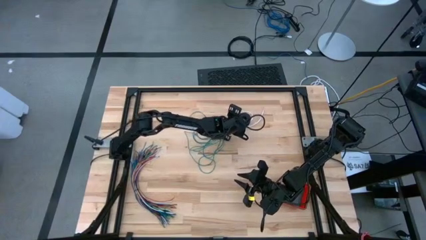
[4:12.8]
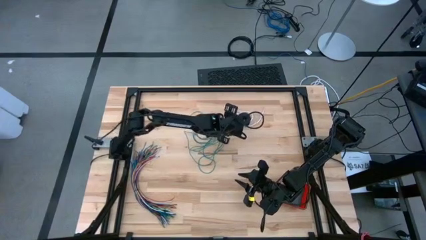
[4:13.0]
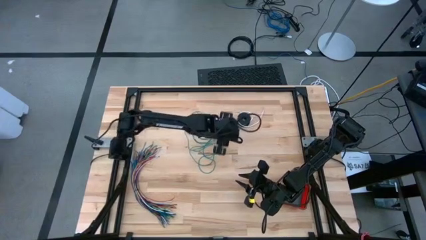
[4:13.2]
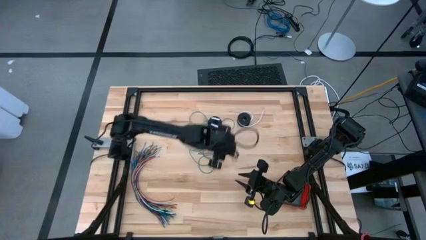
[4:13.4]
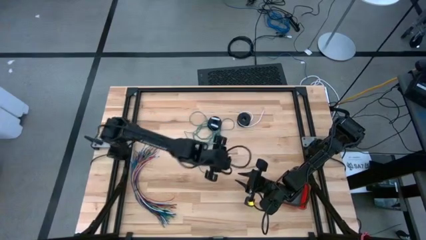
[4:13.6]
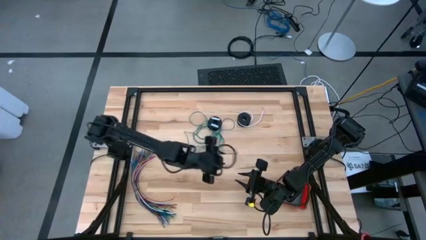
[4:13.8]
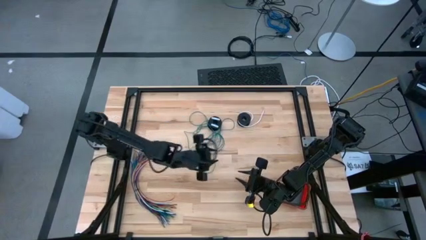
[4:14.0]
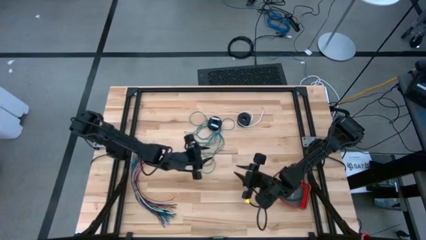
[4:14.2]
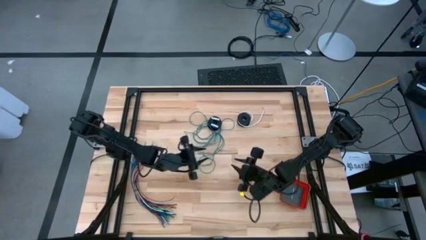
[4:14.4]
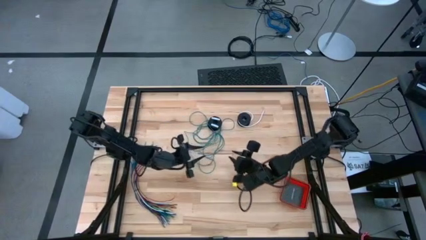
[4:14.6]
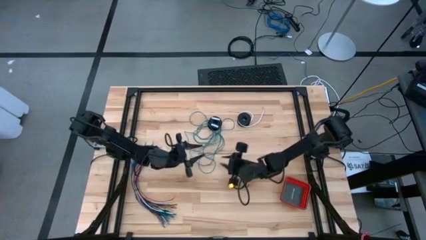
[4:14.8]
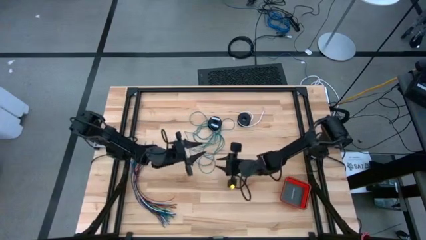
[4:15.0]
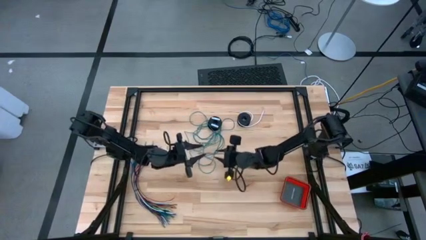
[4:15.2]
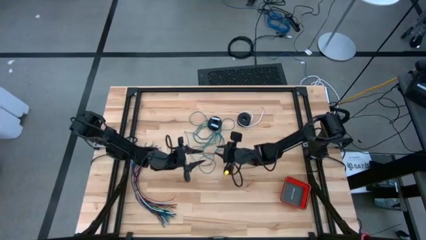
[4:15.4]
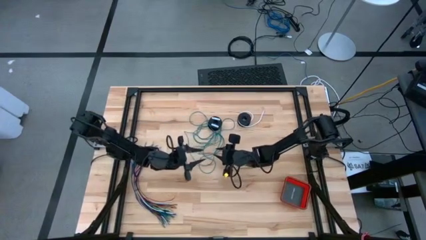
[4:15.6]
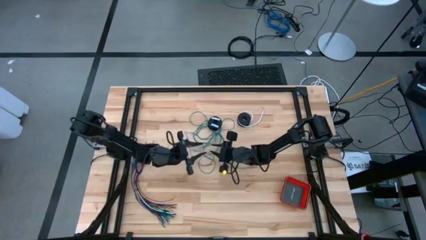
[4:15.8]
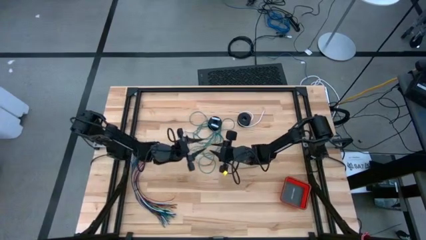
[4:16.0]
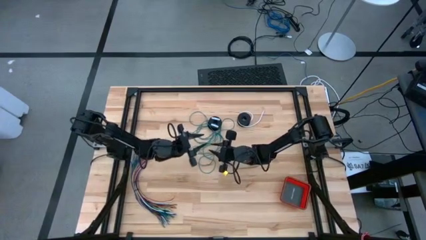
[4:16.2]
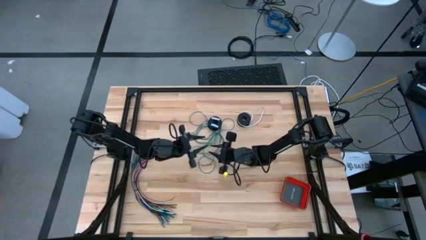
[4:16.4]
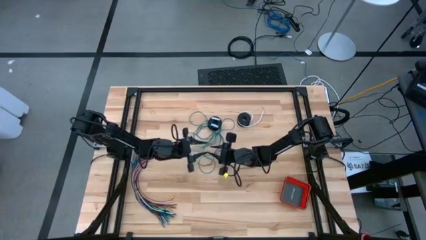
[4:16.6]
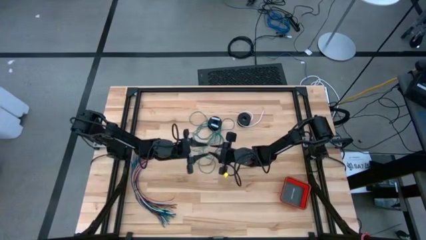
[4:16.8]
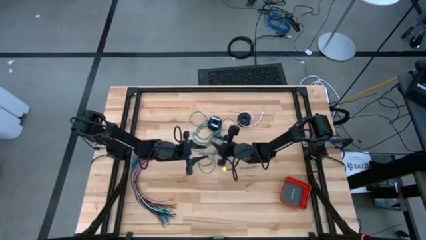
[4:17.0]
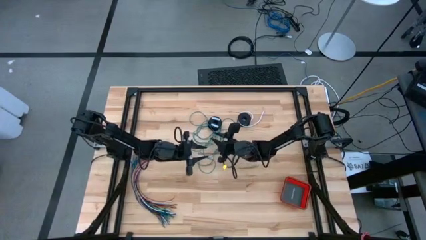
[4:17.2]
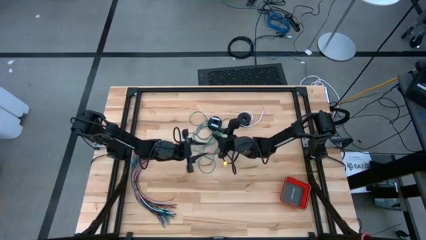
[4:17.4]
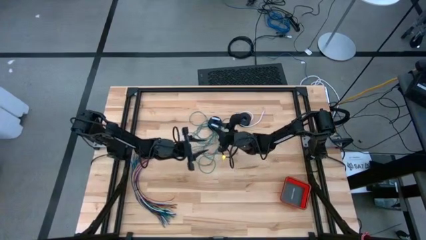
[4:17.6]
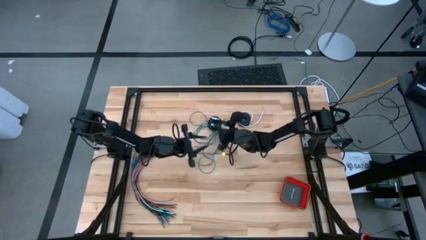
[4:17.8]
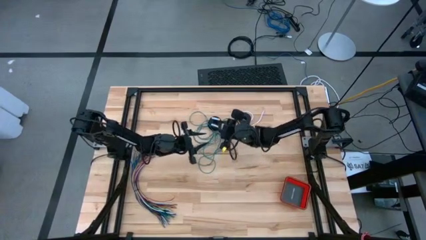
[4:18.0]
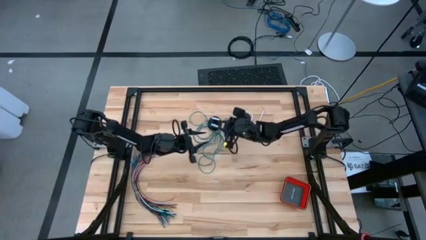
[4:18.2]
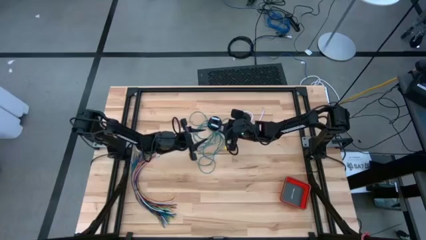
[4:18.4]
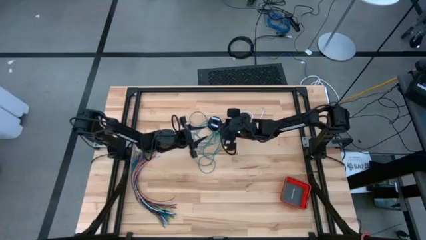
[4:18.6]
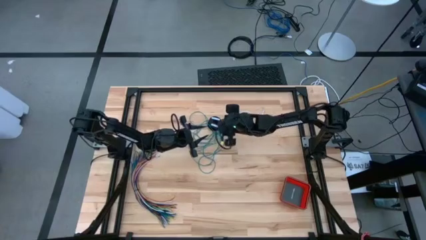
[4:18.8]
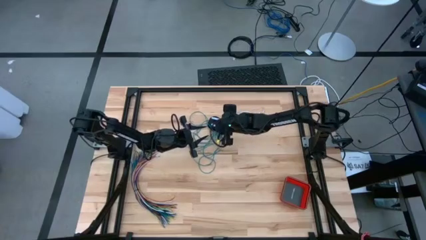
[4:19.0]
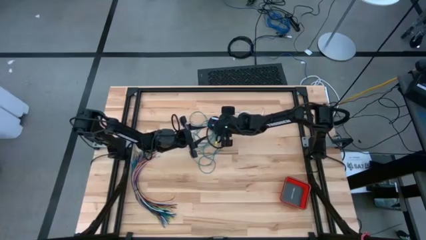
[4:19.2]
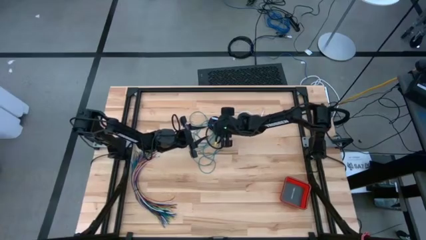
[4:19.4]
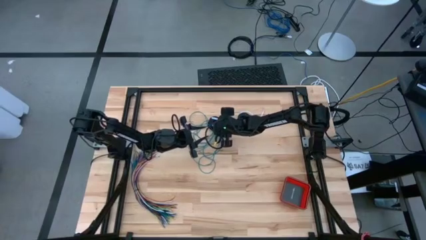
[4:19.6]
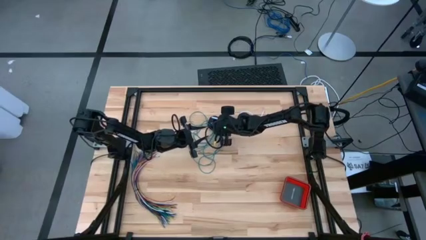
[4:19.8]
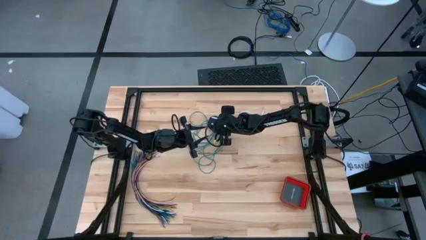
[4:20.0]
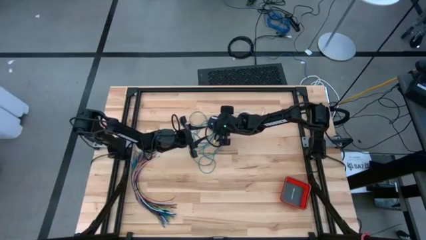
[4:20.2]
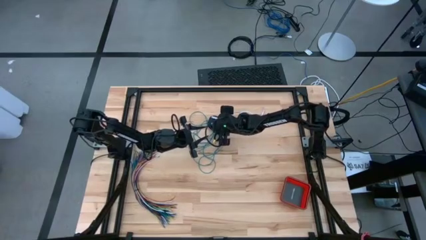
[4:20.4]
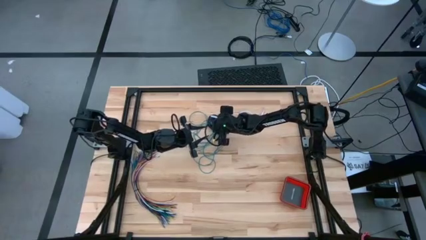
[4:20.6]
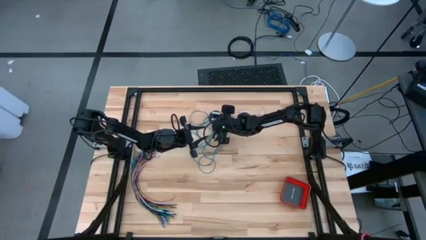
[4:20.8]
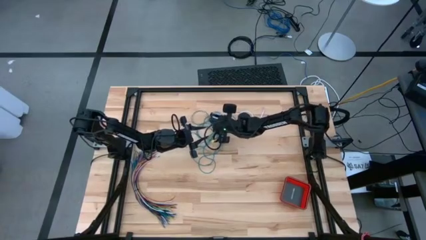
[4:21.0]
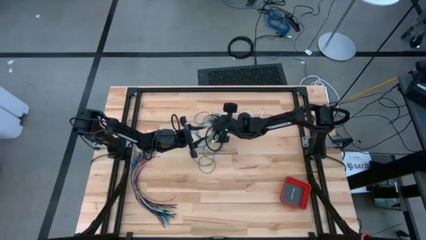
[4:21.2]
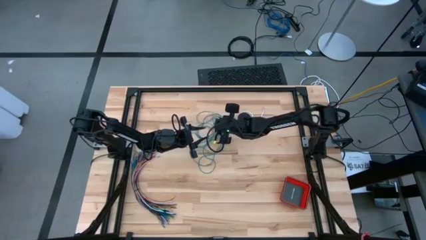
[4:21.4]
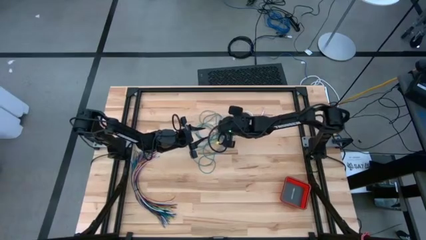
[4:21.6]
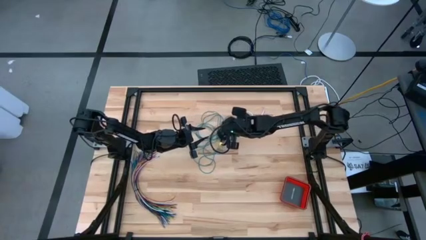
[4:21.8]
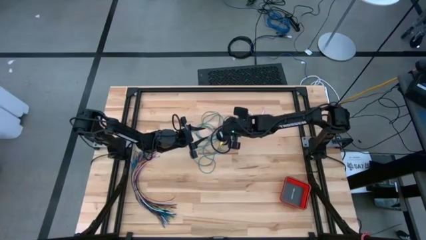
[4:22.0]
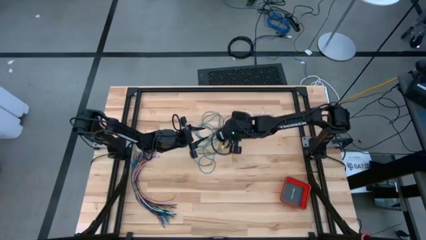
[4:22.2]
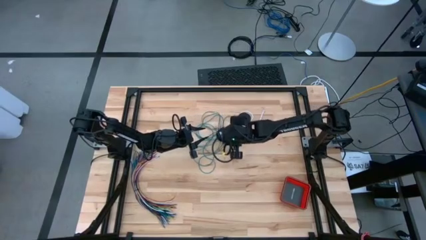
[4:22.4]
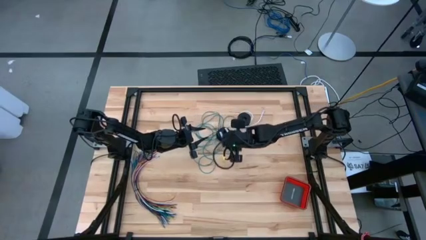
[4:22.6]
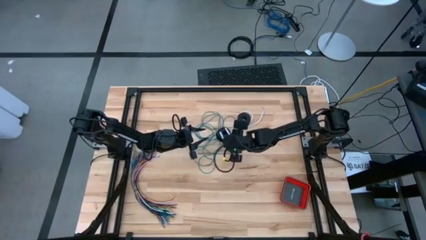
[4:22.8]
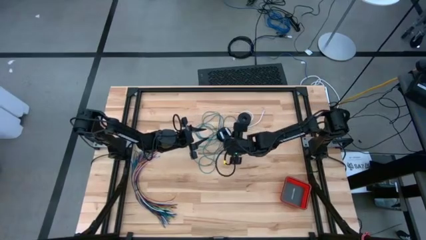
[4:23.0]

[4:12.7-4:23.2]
Task: Coil cords
Coil the green wire onto the spool

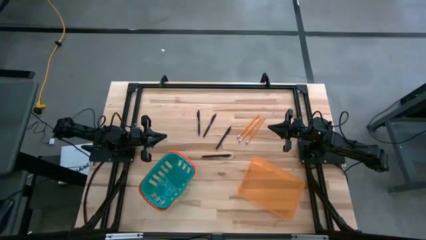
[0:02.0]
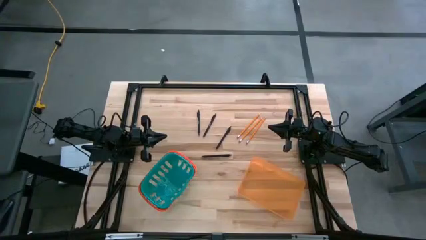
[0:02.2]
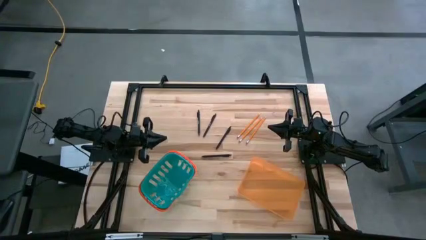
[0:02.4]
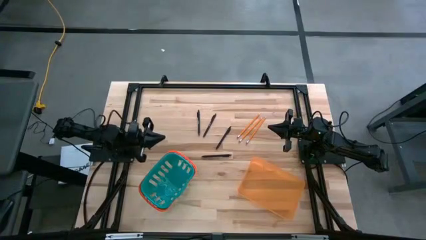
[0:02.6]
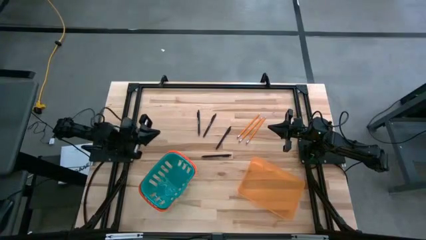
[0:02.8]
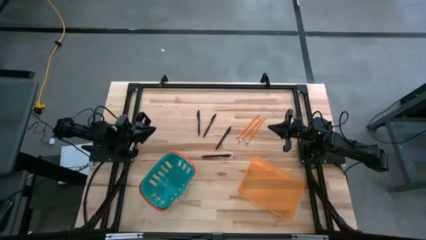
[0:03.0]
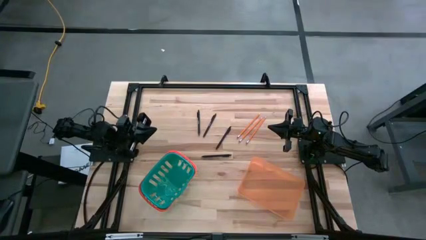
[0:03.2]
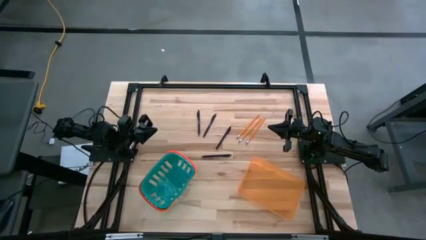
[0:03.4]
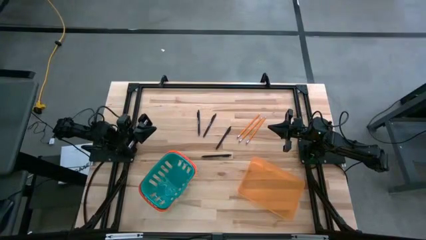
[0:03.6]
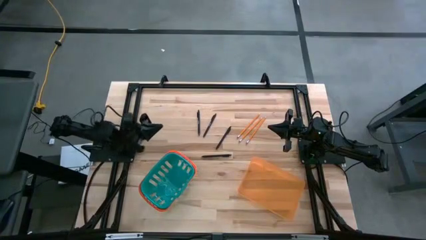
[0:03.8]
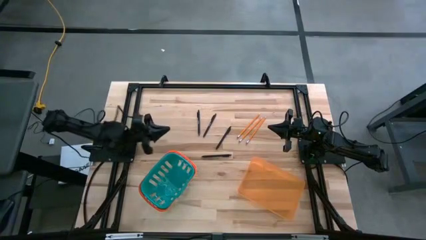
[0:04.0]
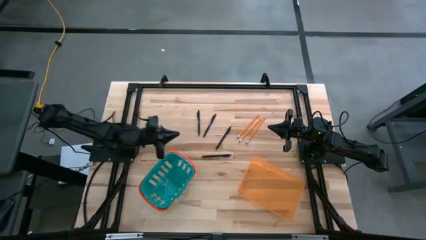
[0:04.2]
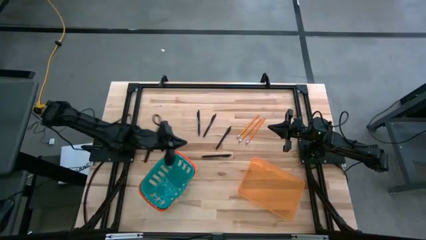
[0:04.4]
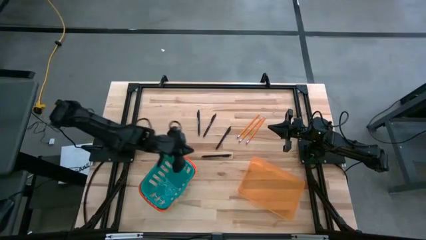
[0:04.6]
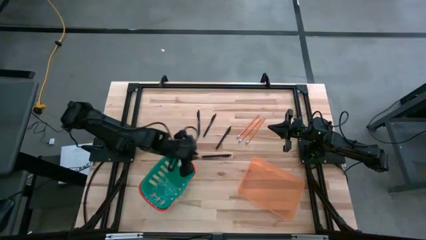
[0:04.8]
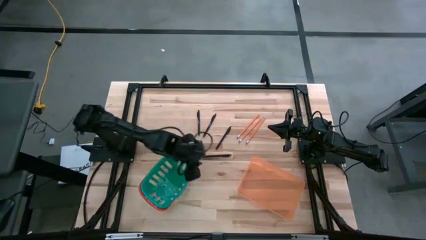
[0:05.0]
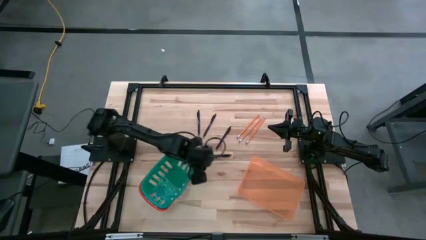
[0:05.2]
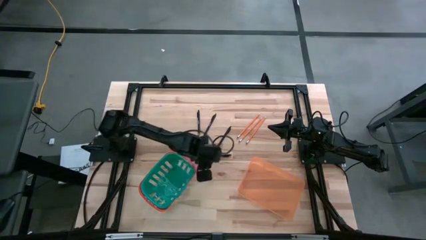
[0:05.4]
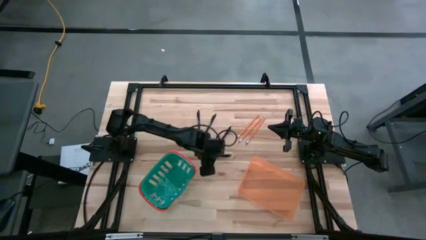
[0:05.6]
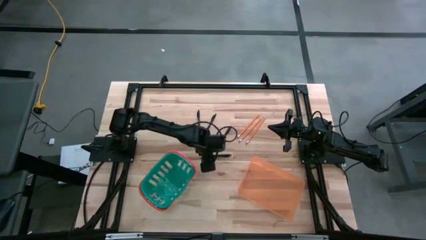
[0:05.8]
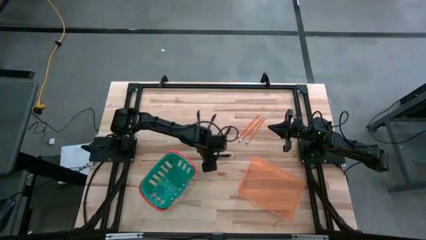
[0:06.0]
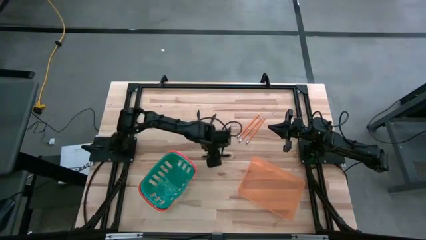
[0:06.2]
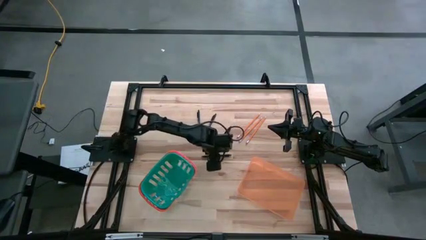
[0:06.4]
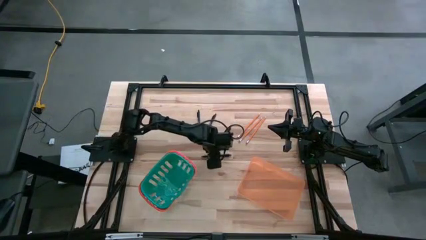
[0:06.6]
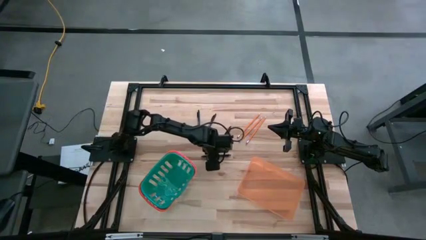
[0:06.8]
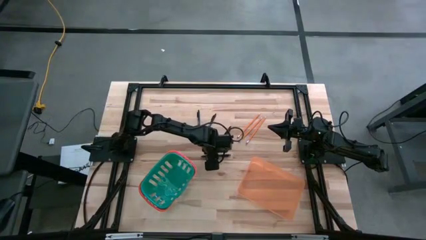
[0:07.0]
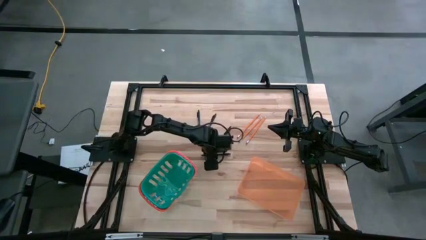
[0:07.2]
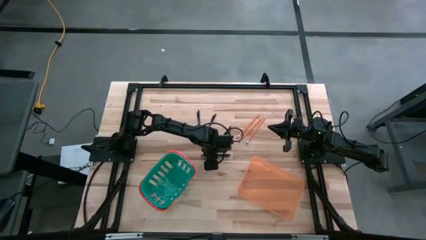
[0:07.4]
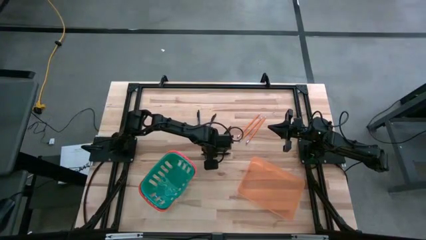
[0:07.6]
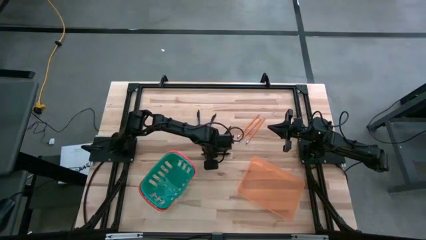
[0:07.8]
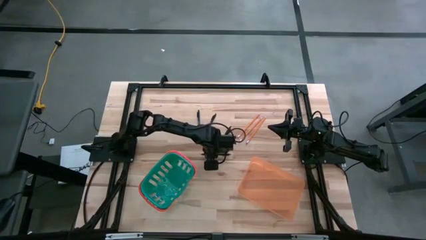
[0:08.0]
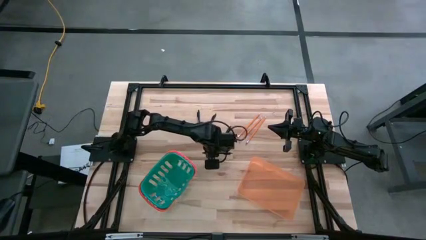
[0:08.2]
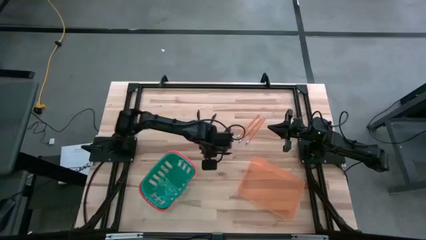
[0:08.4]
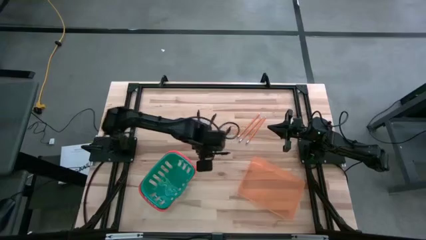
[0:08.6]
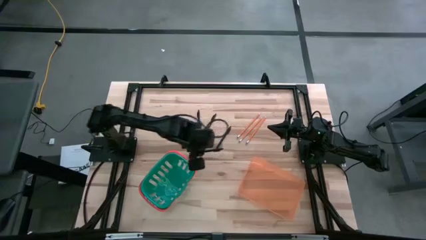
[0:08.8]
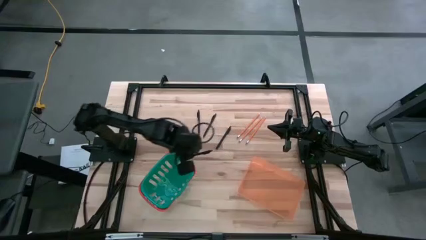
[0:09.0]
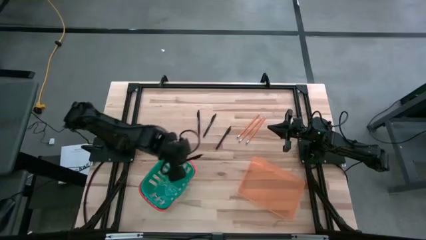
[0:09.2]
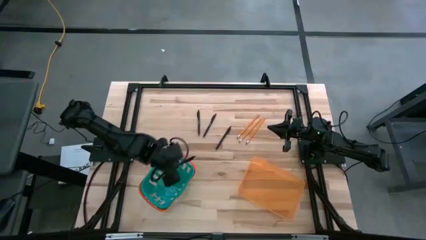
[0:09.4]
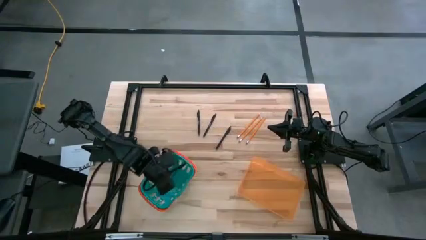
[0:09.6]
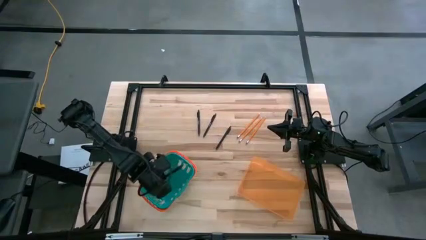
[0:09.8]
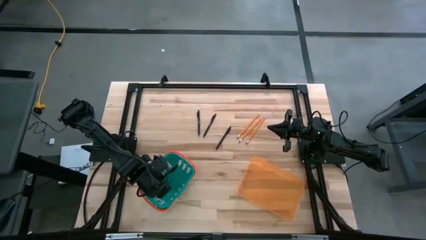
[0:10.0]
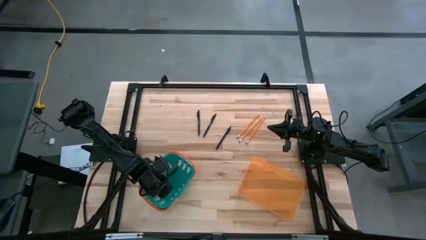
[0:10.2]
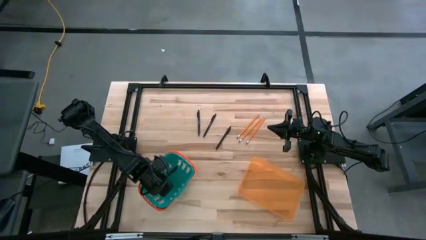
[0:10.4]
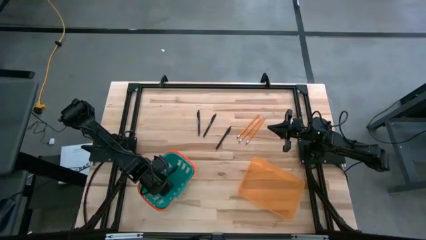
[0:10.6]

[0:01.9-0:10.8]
Task: Sort pens & pencils
Put the bottom black ballpen into the blue bin
